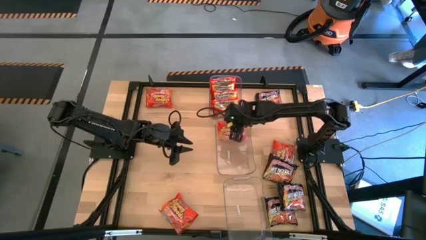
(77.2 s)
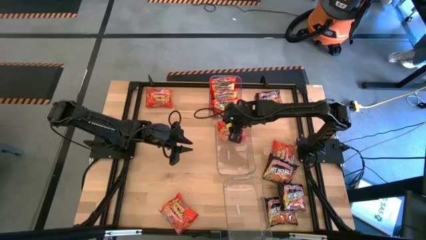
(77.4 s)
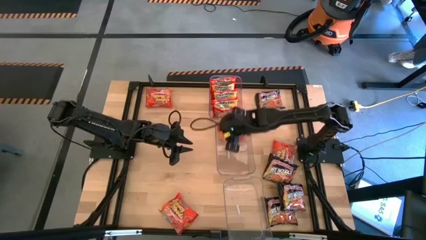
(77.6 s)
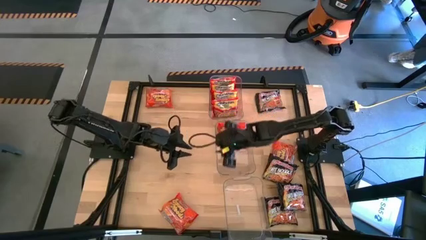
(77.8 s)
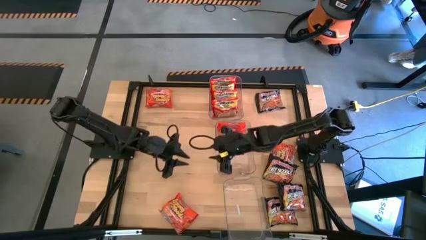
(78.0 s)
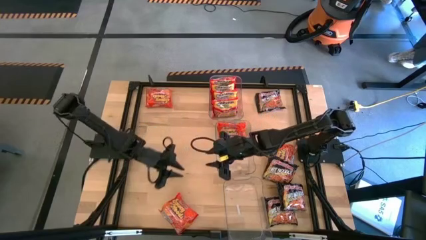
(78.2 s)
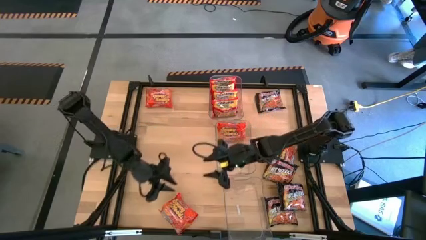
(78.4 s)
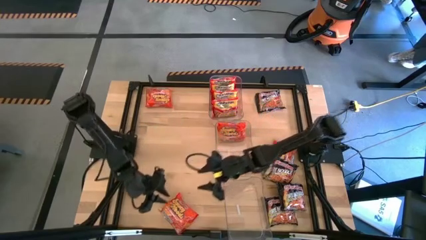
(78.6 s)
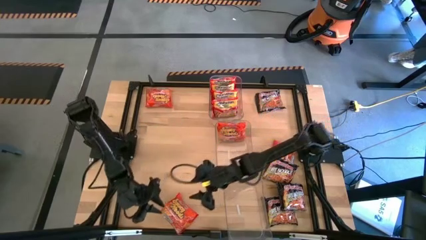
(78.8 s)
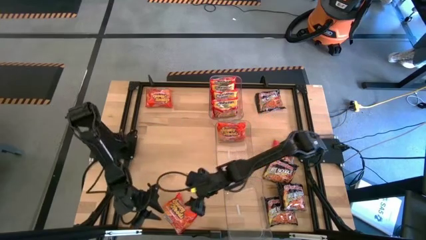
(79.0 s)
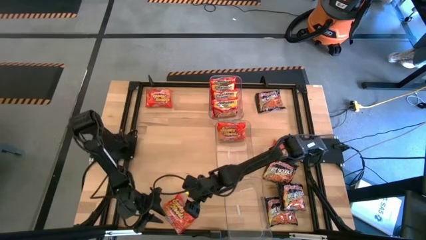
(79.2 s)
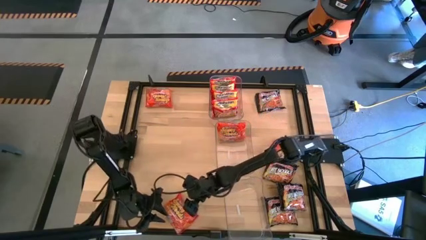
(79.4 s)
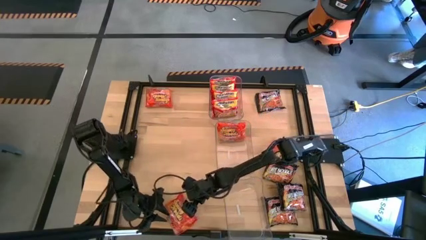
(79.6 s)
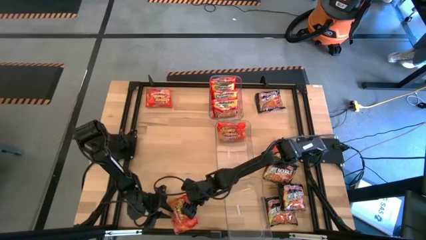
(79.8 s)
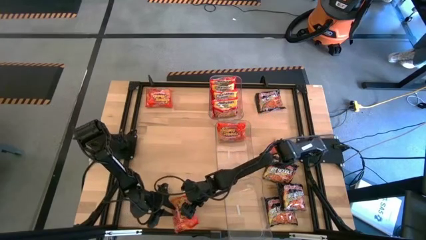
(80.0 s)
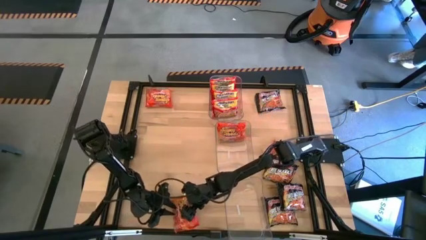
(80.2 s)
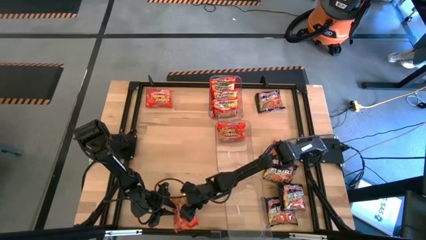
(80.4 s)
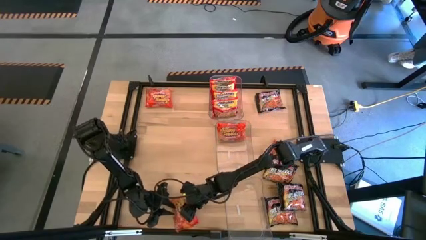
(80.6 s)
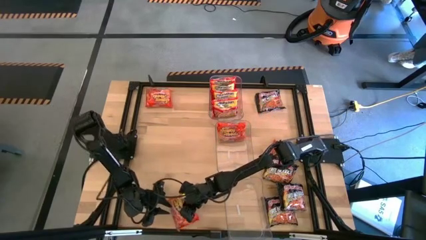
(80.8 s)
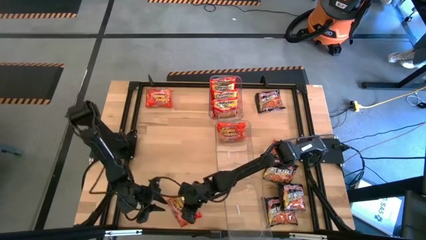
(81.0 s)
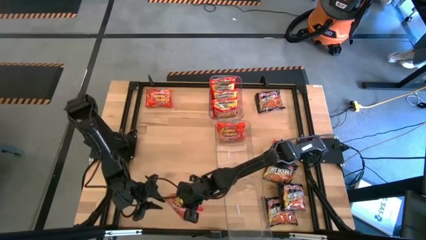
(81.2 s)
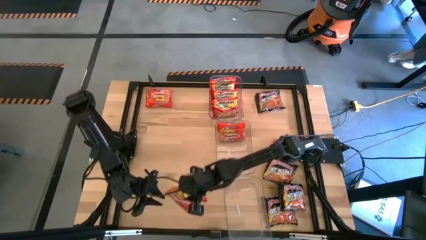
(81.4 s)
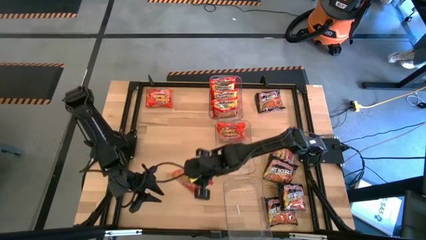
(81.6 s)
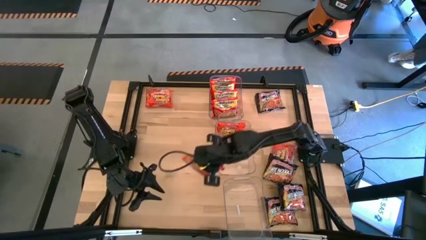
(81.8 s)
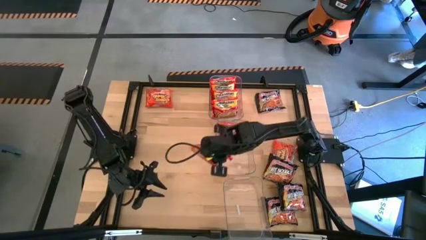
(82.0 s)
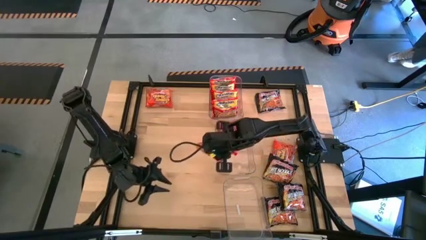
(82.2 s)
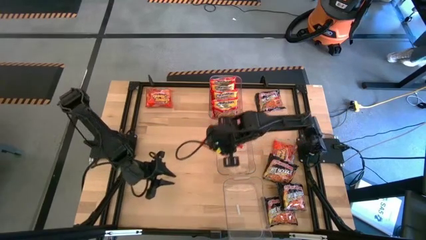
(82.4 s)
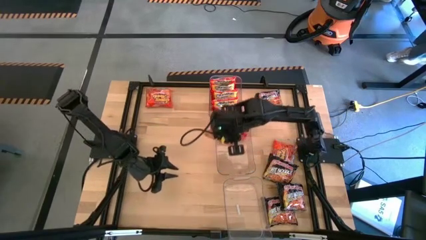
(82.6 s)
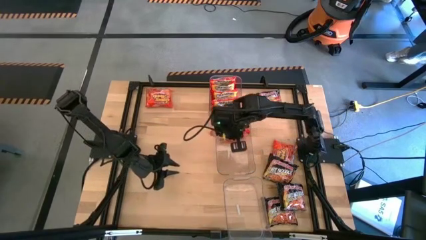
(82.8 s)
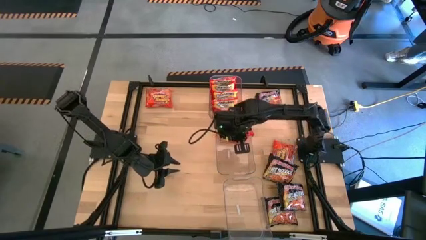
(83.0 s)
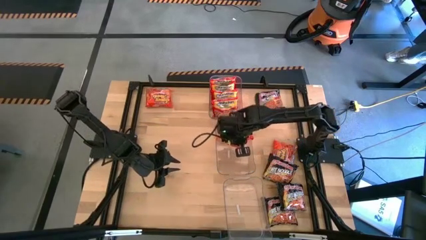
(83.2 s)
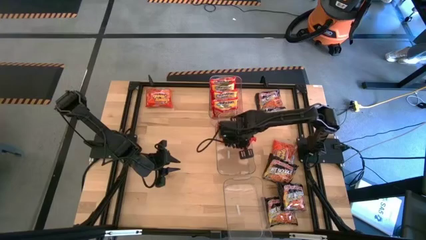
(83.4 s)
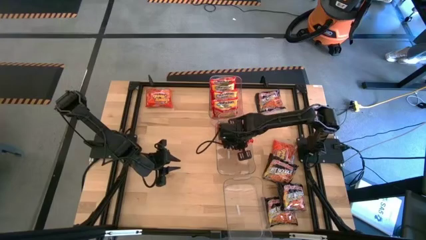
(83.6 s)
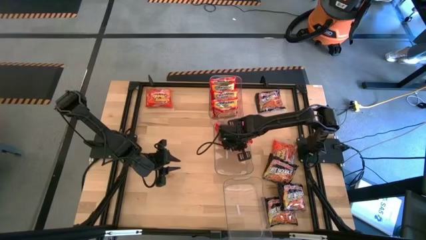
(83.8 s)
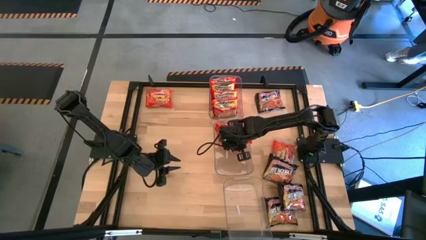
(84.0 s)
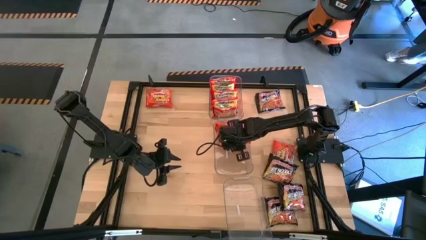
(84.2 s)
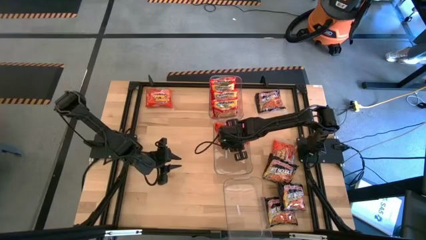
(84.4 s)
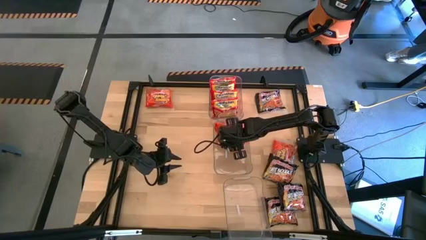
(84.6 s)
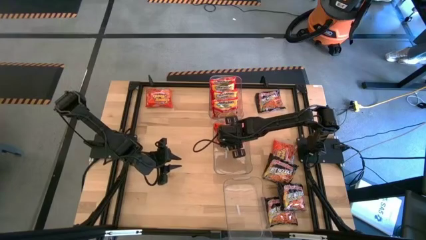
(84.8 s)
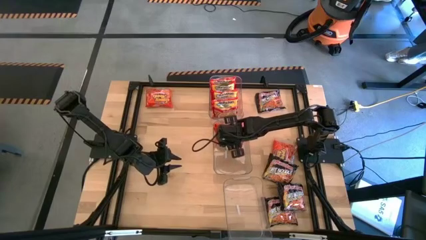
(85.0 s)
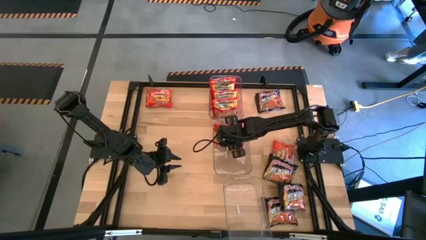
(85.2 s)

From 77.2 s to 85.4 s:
Task: Sort Maruchan noodles
Put the orange noodle pack into the middle transparent bin

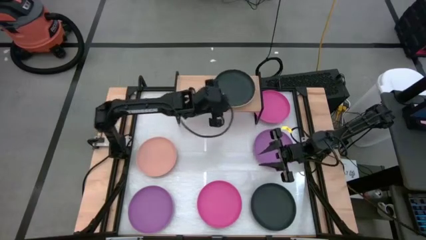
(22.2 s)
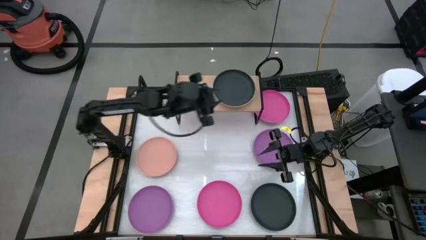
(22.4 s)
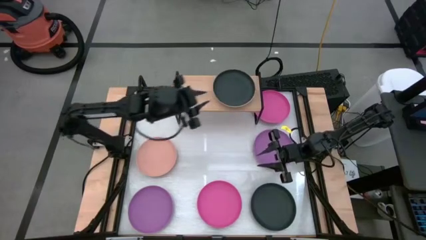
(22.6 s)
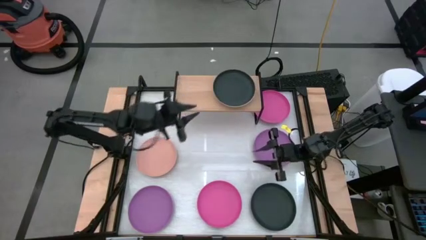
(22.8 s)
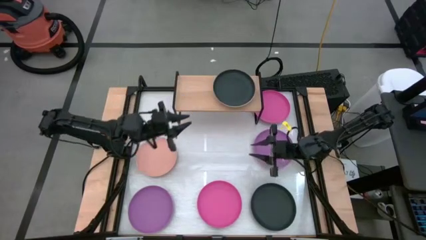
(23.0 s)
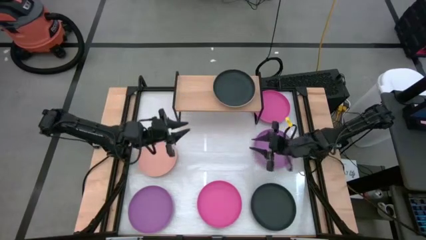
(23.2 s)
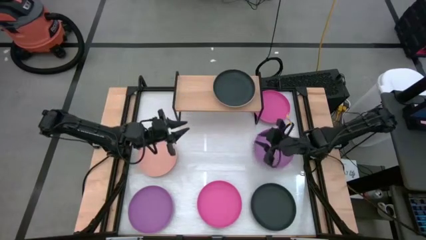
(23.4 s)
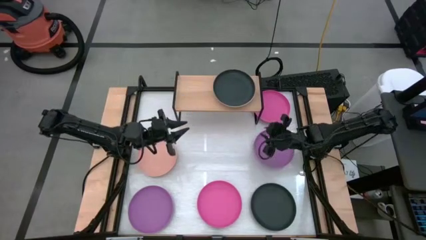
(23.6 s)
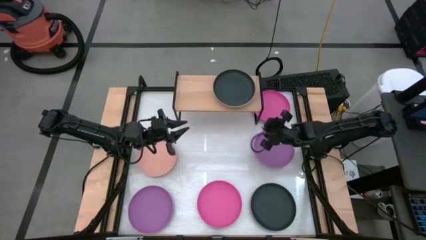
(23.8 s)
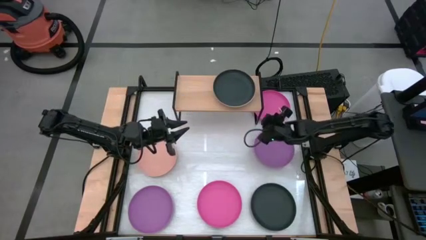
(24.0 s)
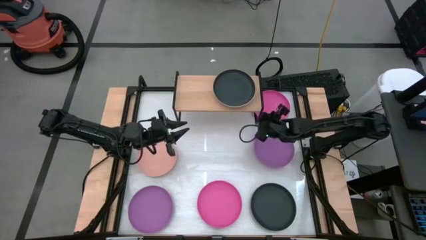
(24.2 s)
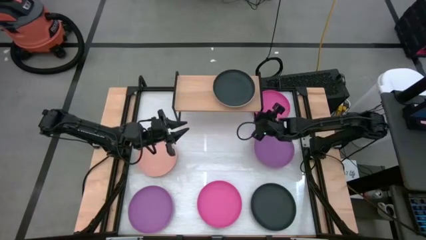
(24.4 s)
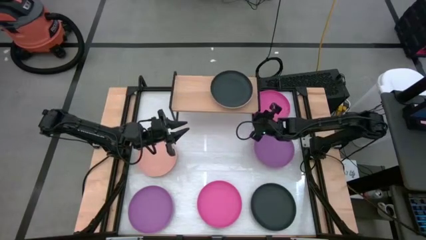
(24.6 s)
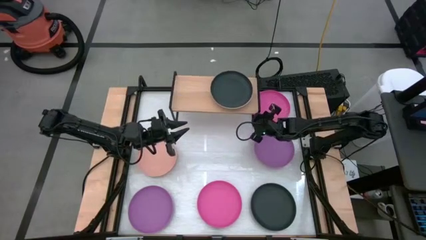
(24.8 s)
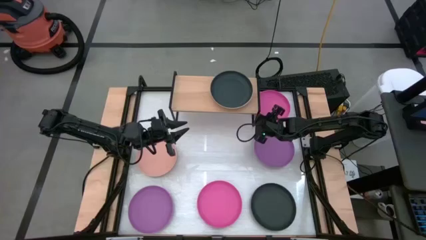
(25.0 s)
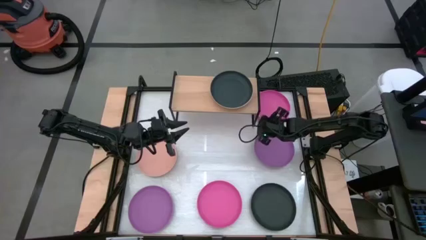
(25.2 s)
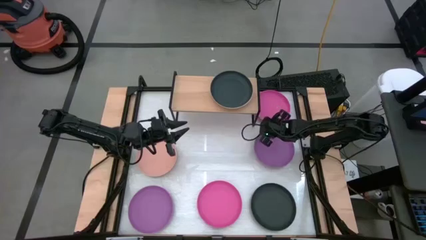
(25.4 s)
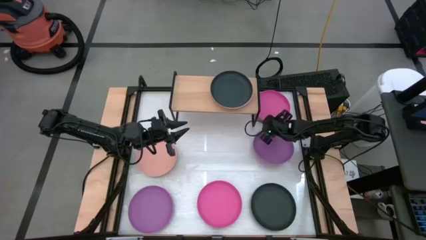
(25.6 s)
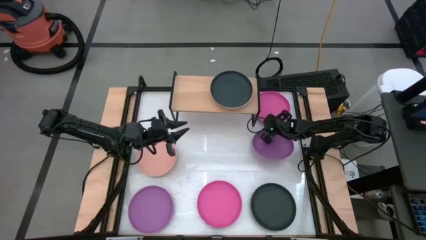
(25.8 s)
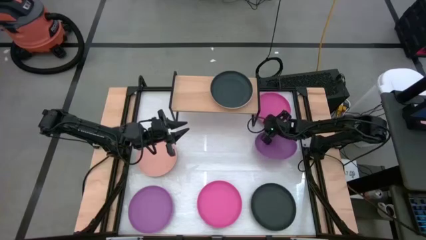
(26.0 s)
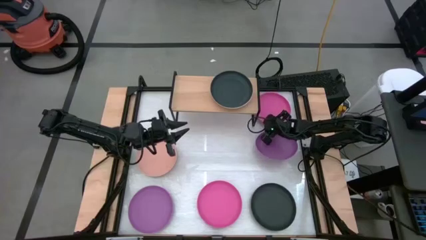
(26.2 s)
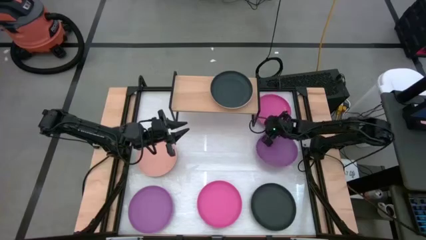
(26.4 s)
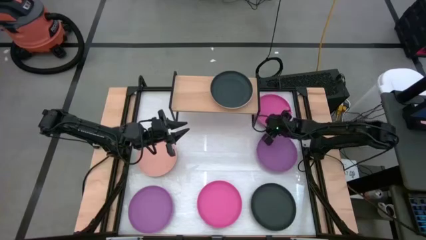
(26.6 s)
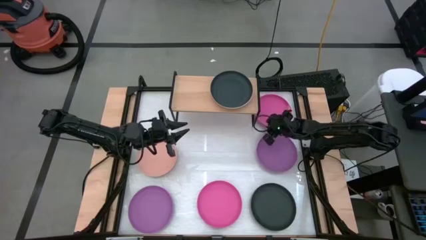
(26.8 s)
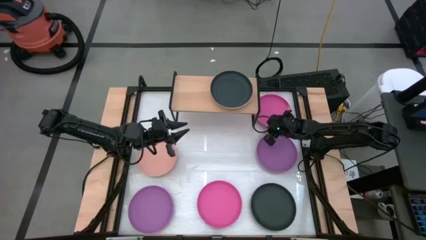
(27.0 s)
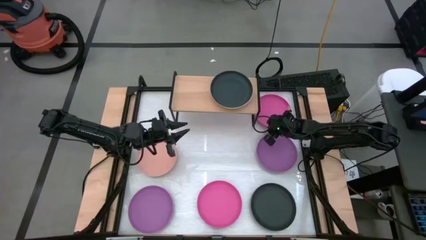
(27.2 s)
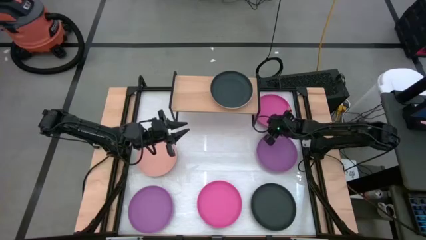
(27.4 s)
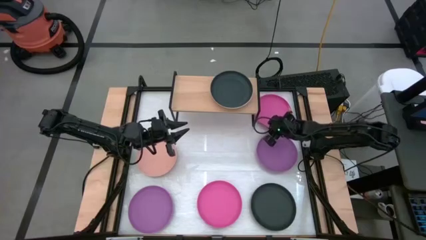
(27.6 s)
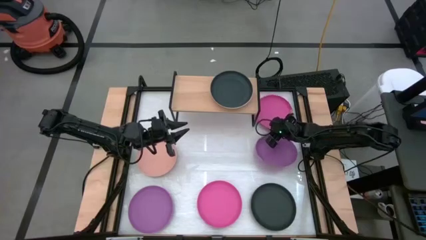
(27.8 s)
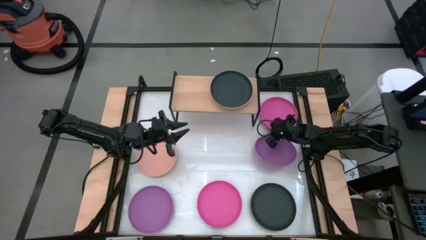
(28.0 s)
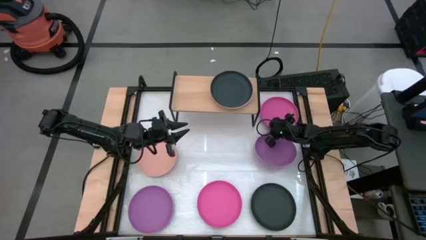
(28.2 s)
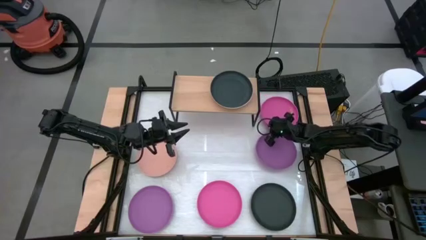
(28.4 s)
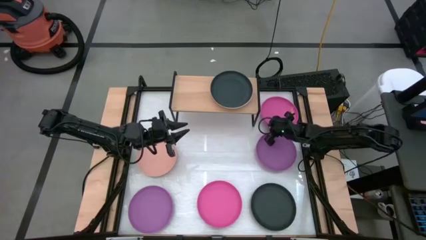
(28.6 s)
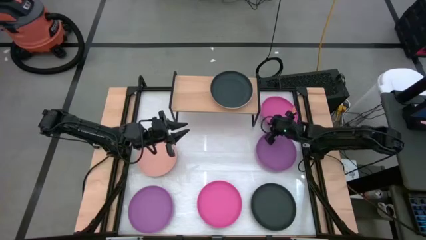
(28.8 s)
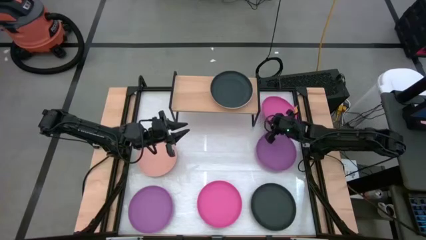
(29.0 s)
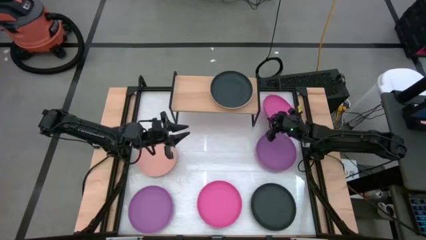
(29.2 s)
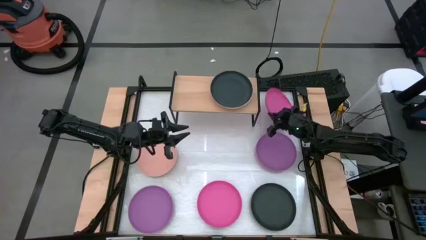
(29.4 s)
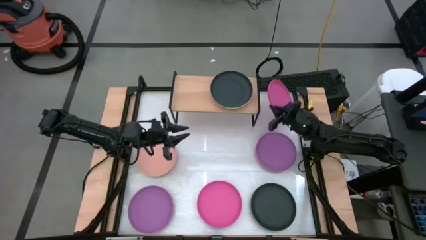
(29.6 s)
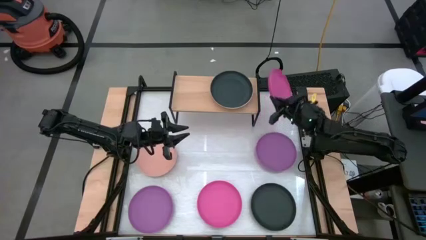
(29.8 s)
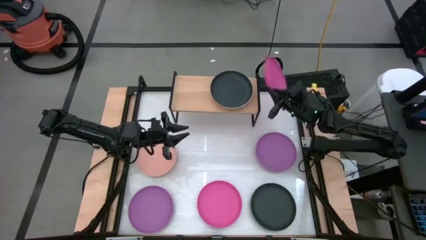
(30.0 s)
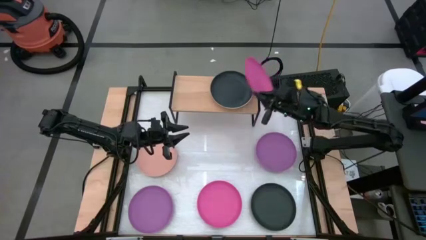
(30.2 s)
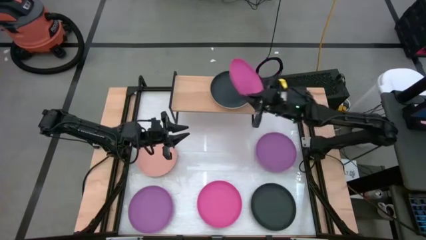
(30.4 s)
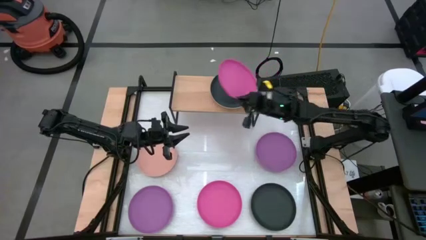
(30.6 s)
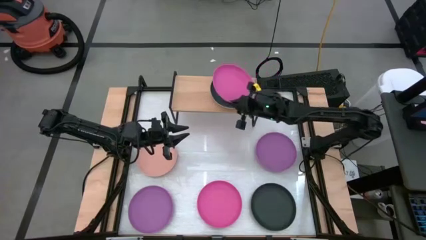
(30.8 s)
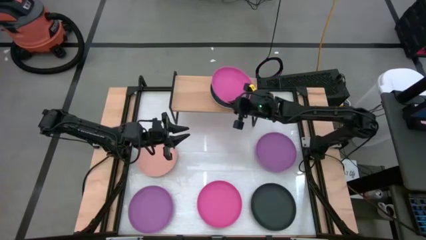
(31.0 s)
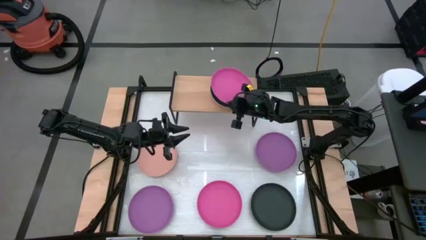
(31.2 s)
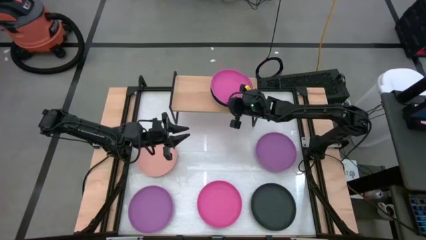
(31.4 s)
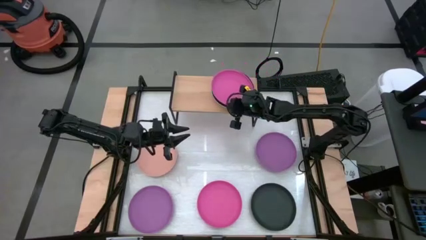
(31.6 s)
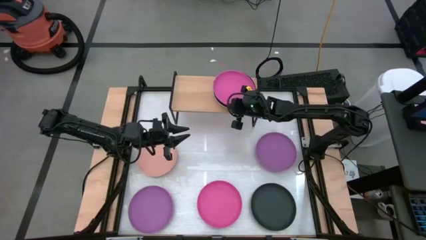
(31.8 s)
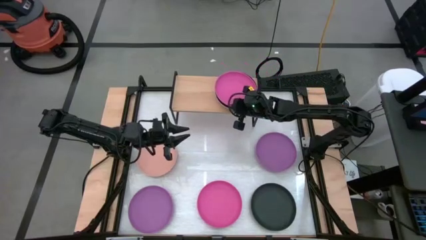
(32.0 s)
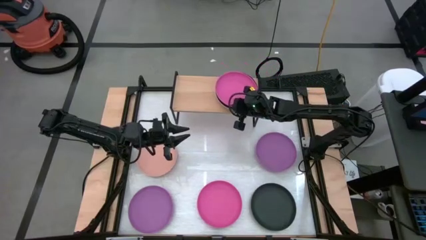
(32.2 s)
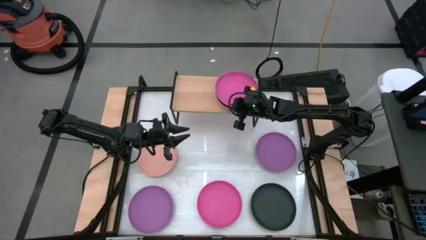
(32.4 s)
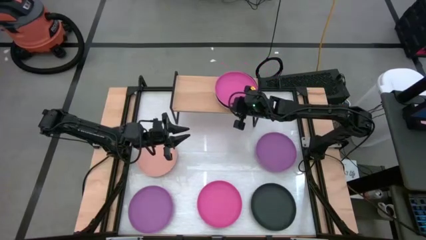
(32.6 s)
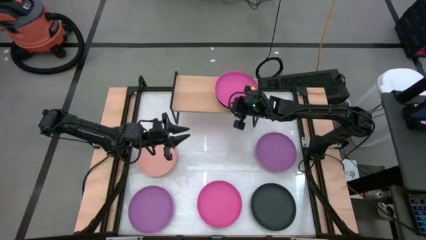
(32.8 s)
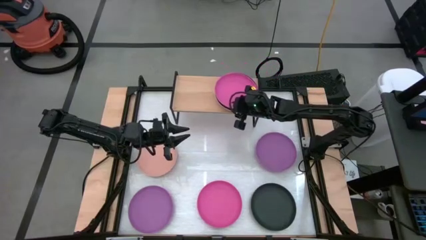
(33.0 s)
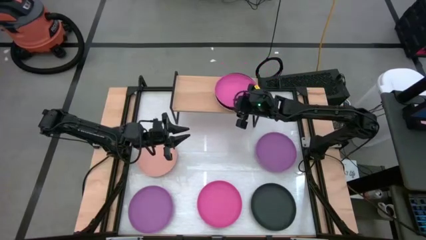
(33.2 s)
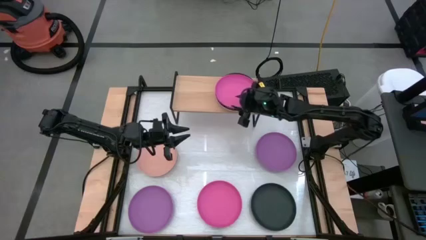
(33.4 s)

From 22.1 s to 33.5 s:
Task: Place and stack plates onto a shelf
Stack the top pink plate on top of the black plate on the shelf
